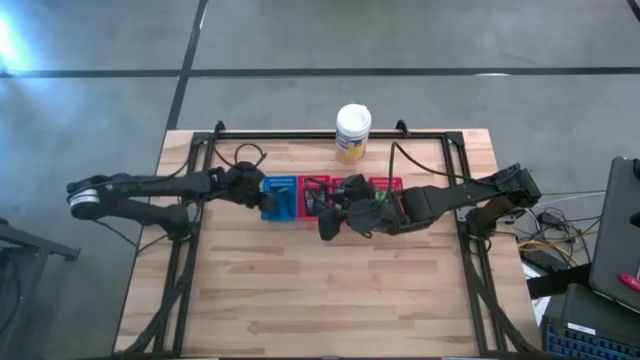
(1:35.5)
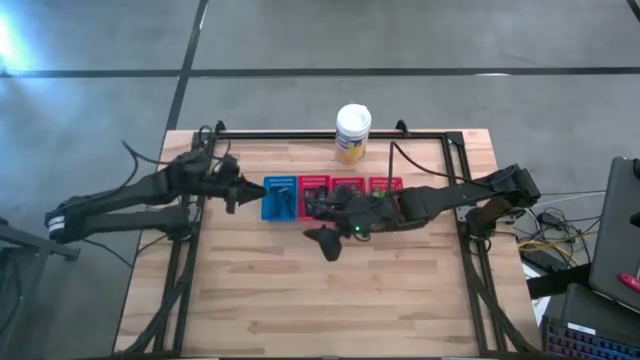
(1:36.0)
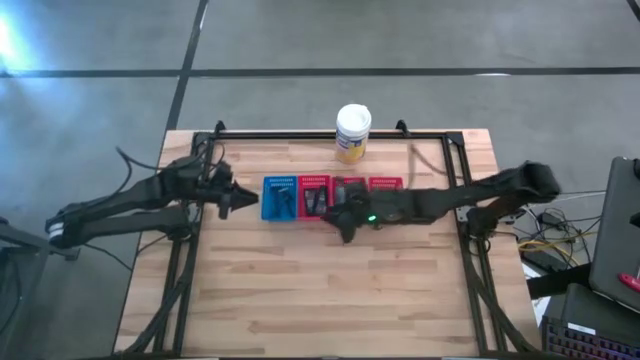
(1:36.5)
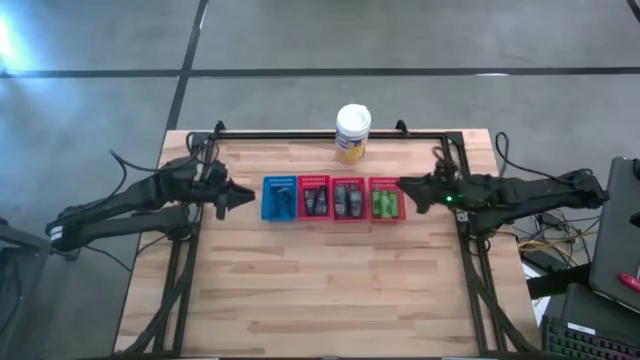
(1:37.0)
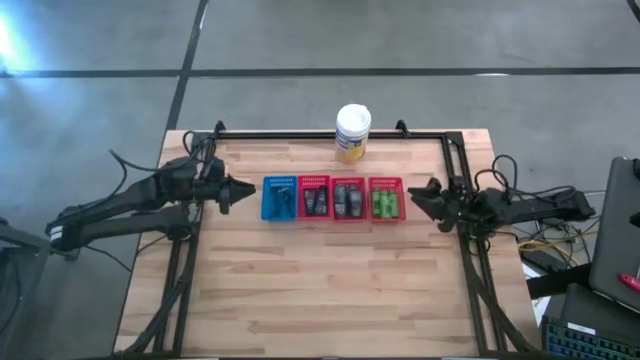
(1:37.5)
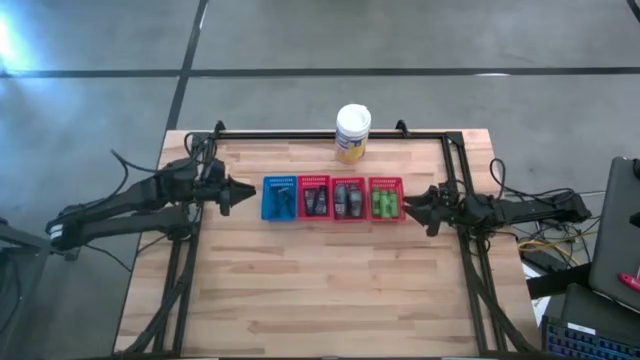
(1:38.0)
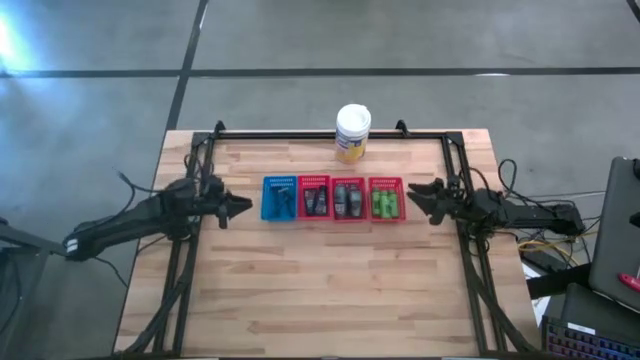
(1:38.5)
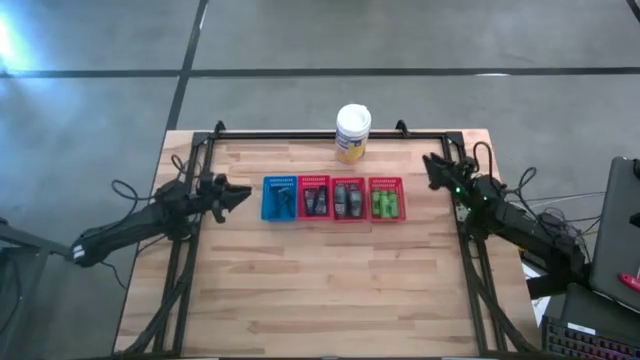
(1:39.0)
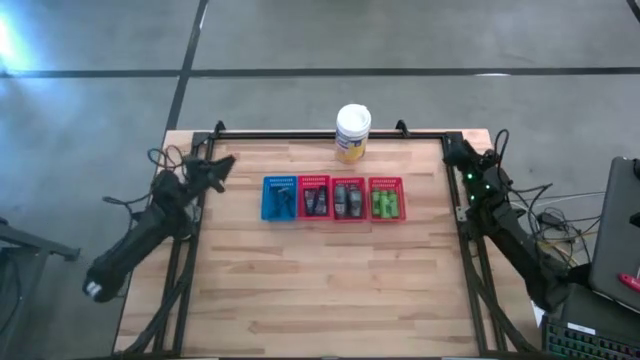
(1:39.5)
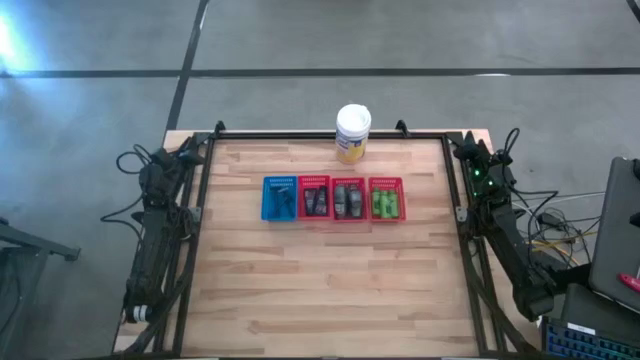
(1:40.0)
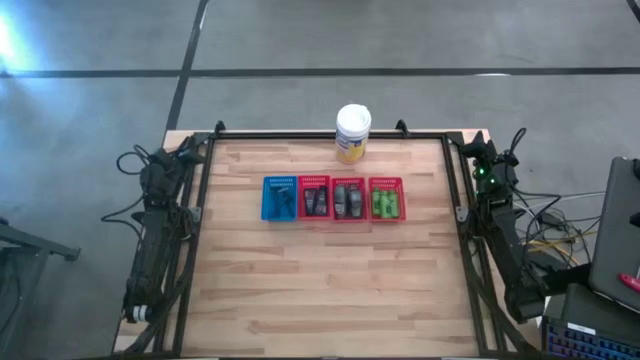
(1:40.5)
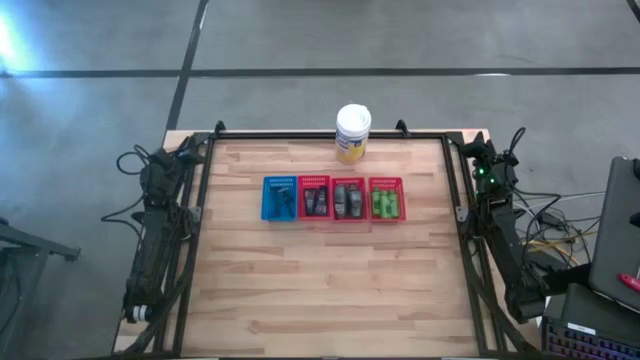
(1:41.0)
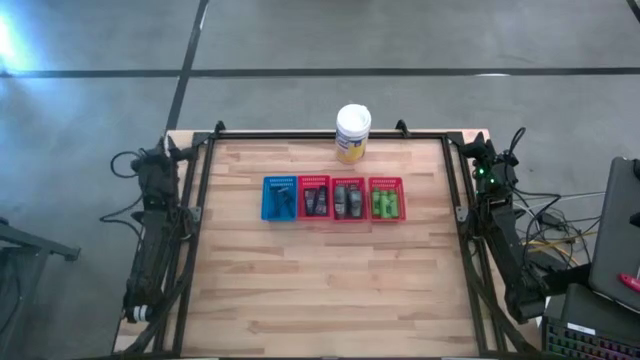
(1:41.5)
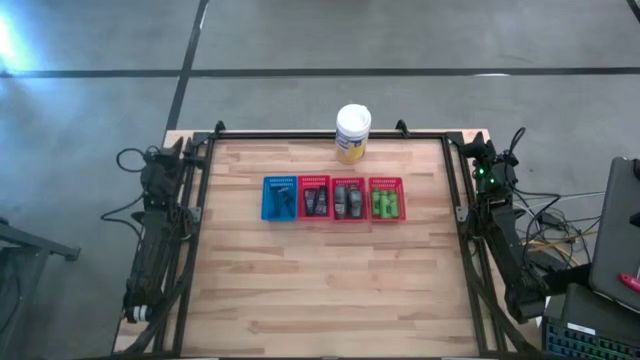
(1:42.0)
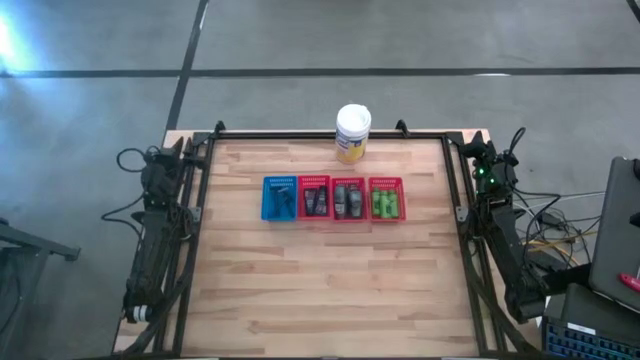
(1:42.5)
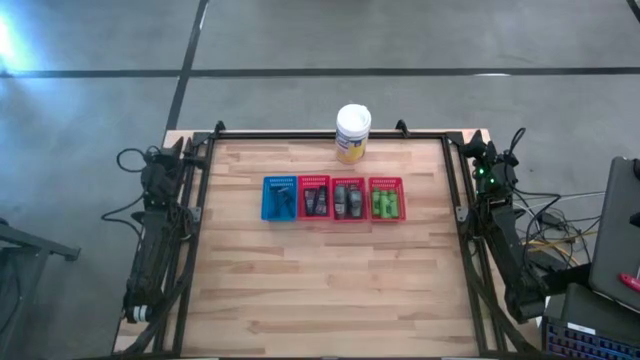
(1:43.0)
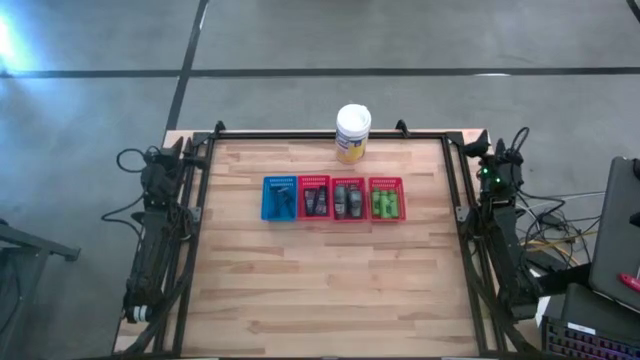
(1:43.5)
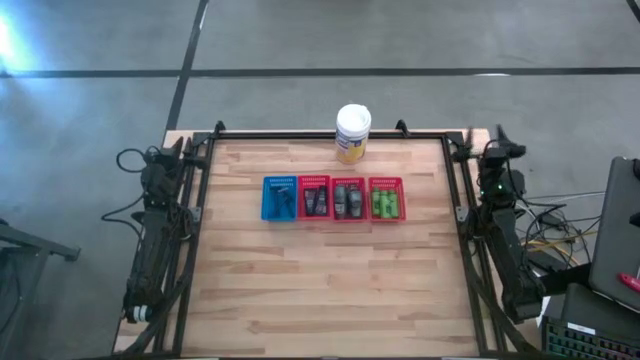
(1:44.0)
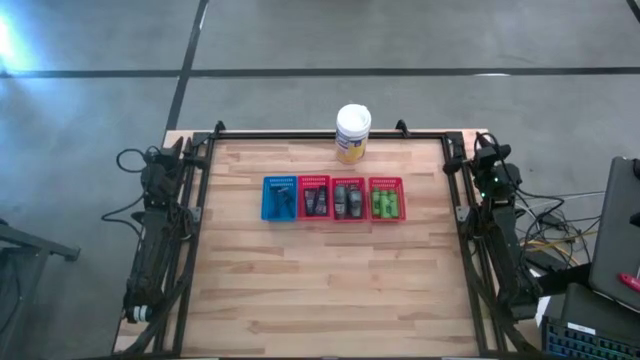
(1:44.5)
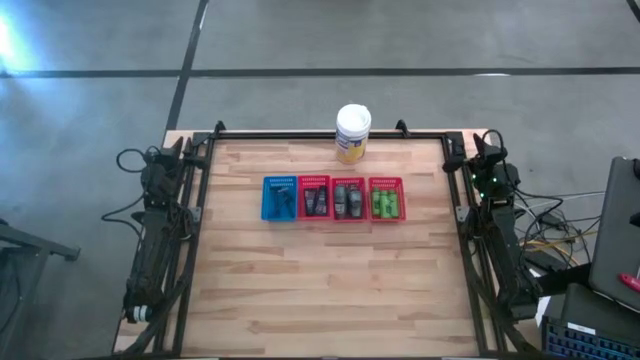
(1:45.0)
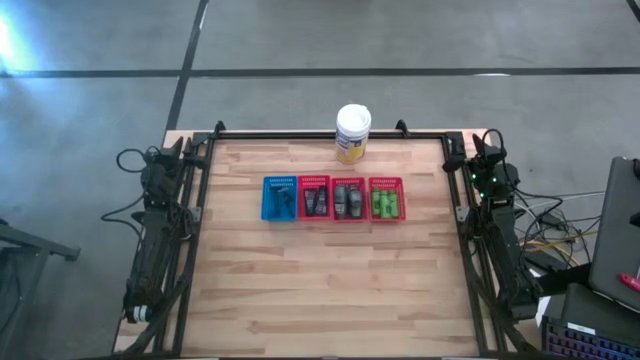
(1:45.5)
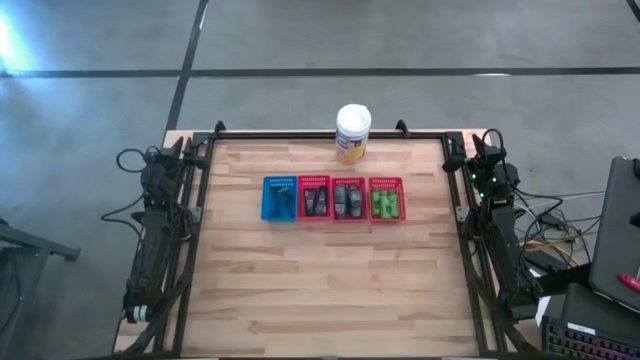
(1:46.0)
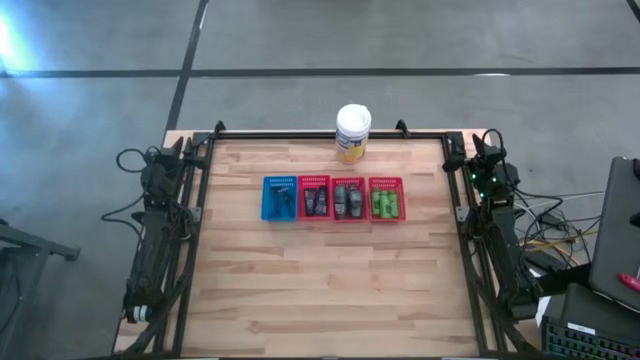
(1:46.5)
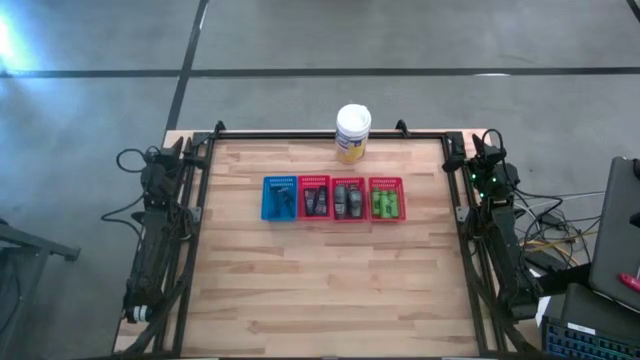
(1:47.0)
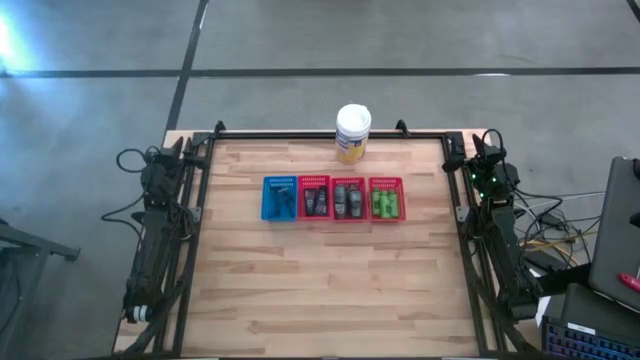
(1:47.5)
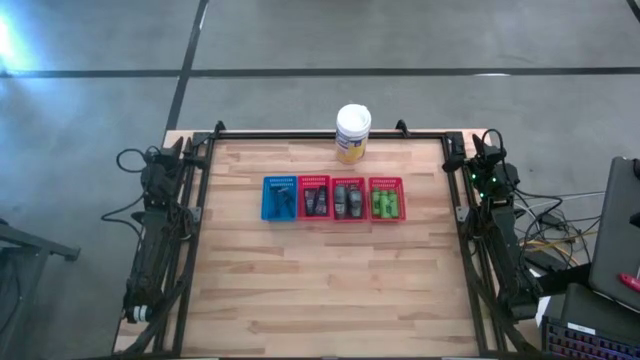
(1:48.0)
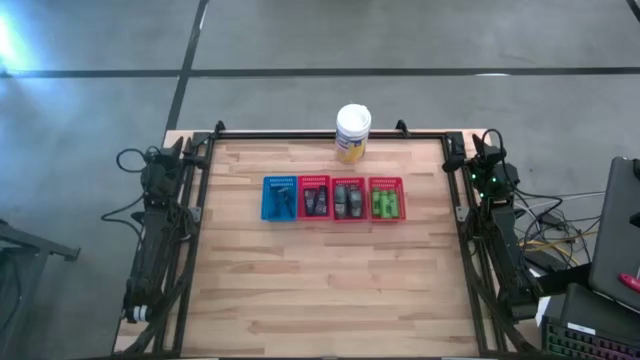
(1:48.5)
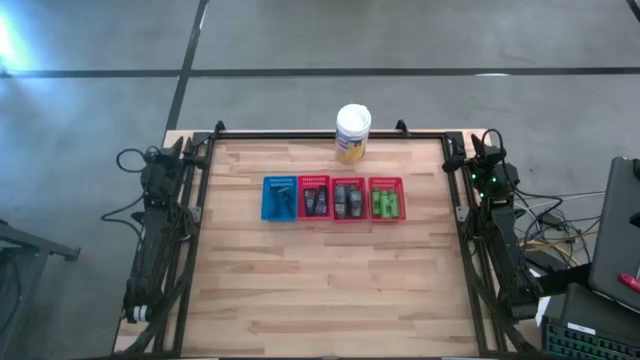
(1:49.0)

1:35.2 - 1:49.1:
Task: Pick & Place Travel size toiletries
Return to Home Position

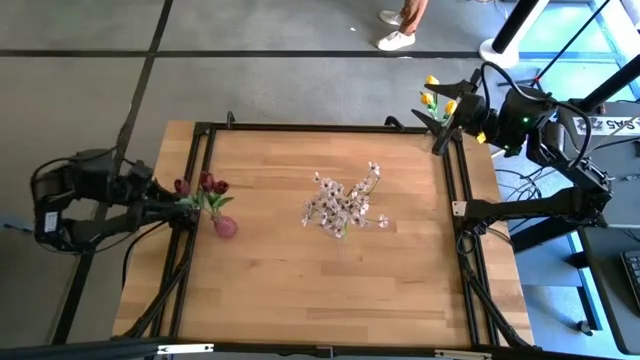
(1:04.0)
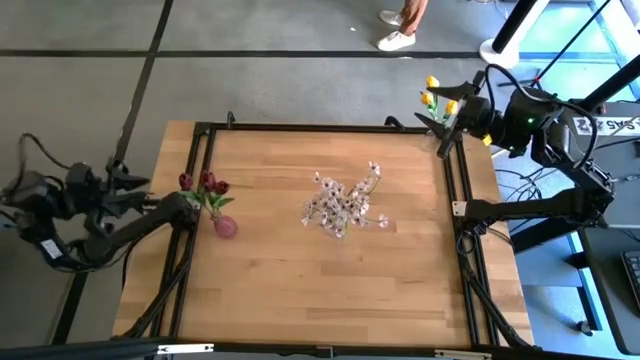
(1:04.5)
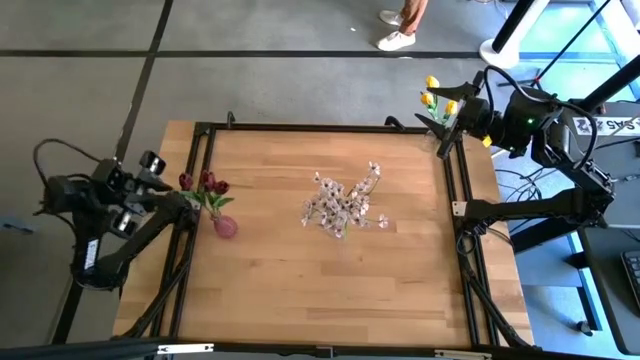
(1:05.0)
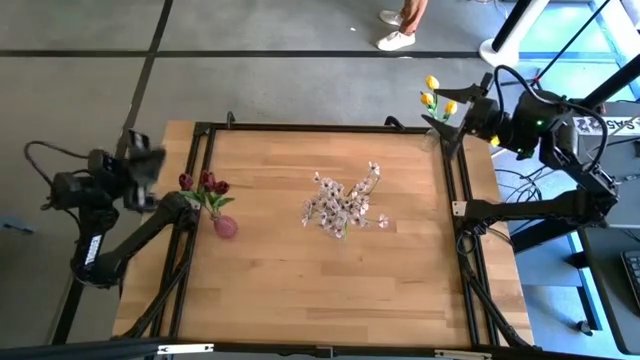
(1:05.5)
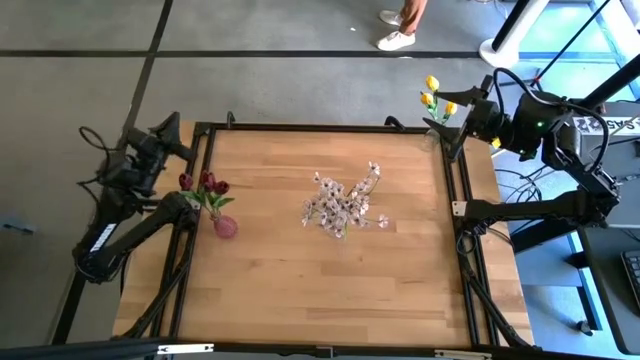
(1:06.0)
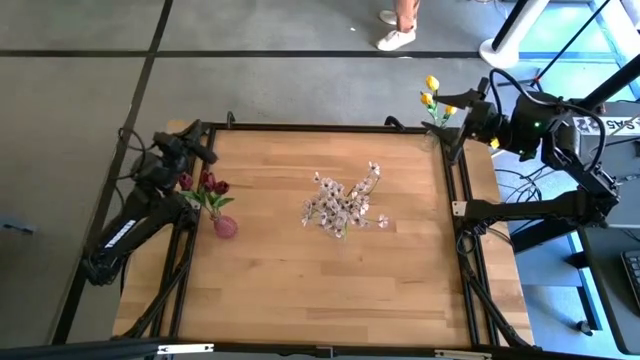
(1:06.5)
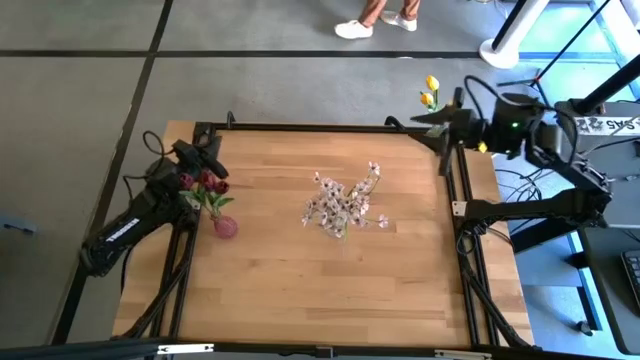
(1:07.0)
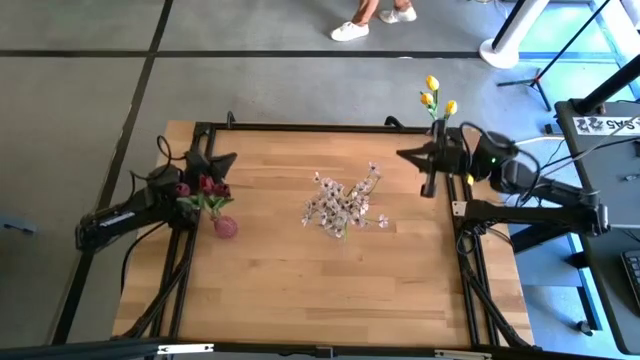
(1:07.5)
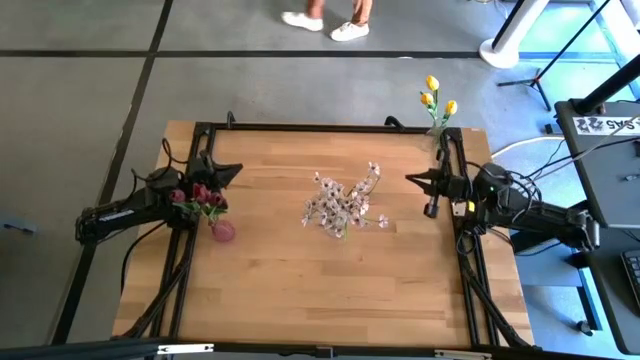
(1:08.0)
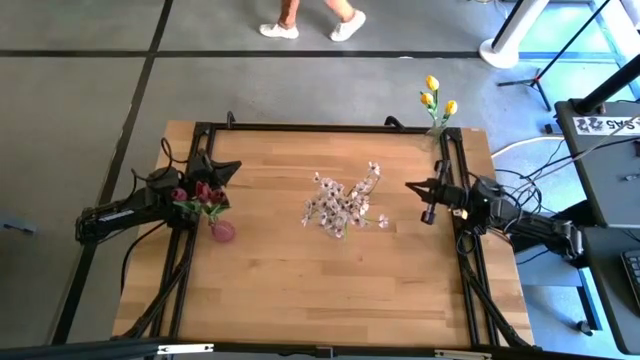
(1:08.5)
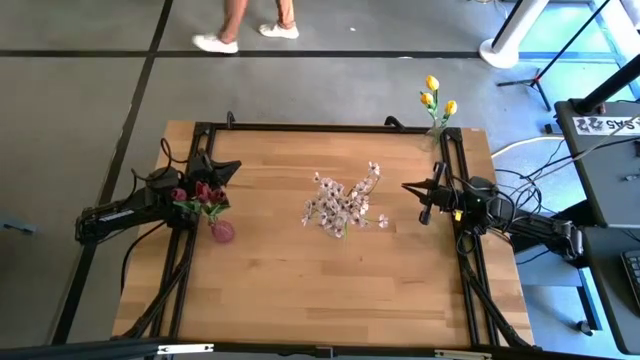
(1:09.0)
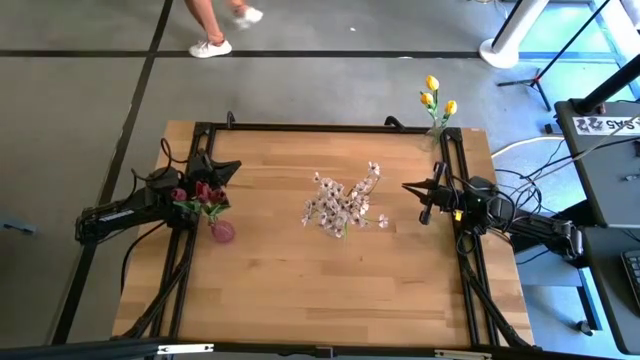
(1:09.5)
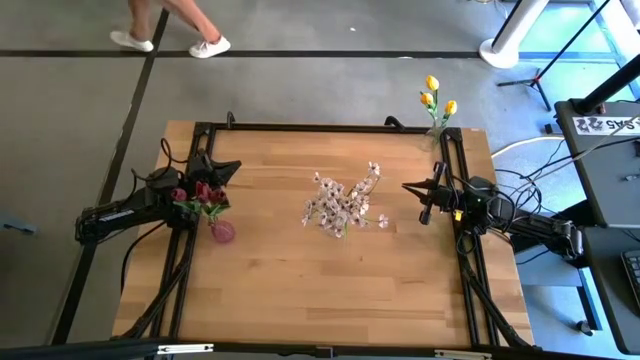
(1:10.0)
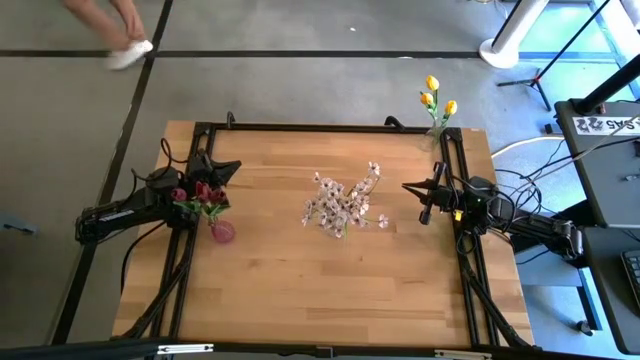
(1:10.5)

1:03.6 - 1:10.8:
Task: Sort flowers into vase by color
Return to Home Position
